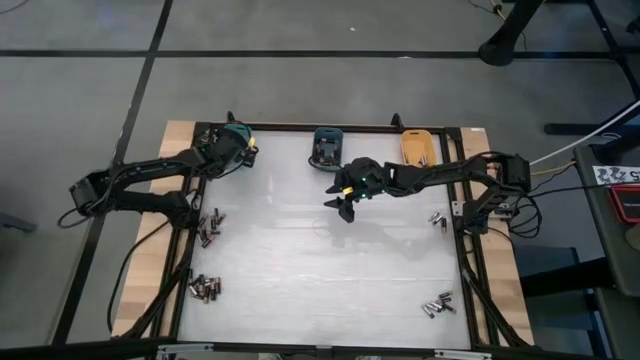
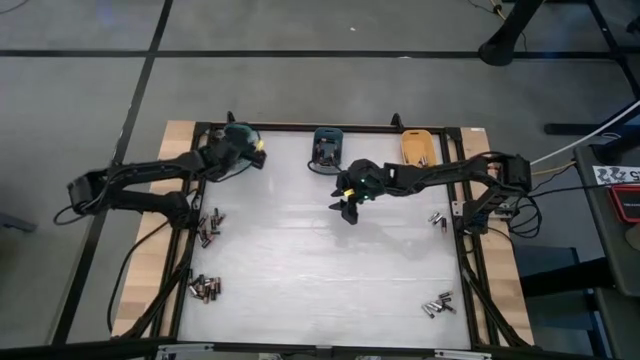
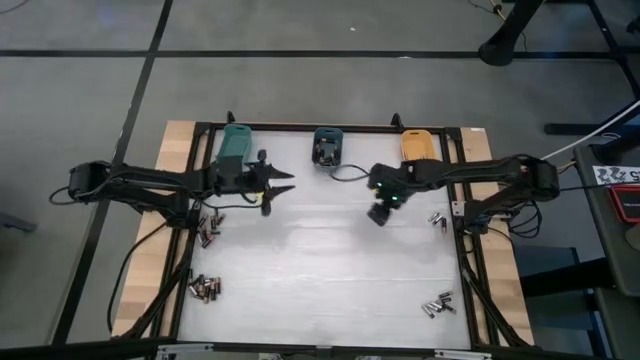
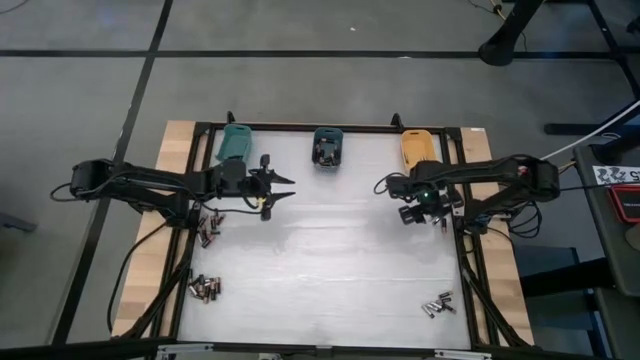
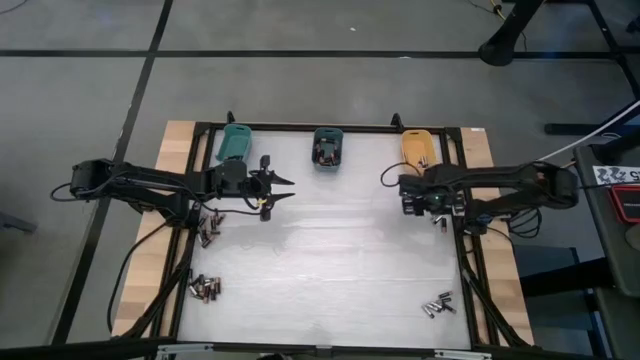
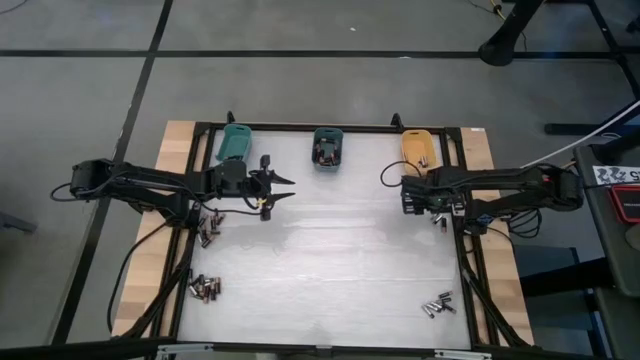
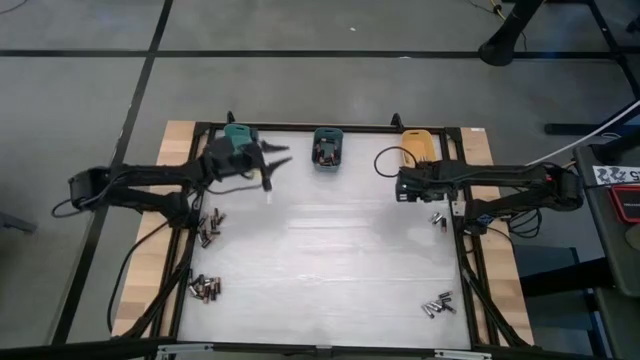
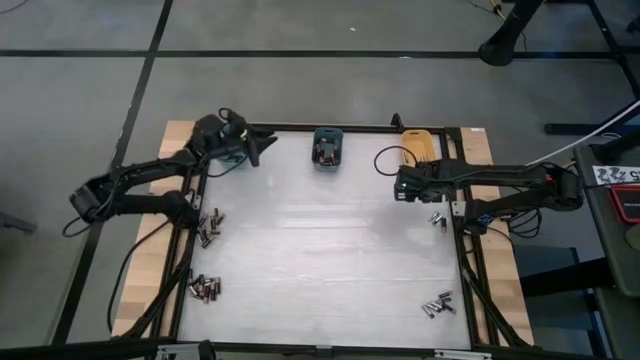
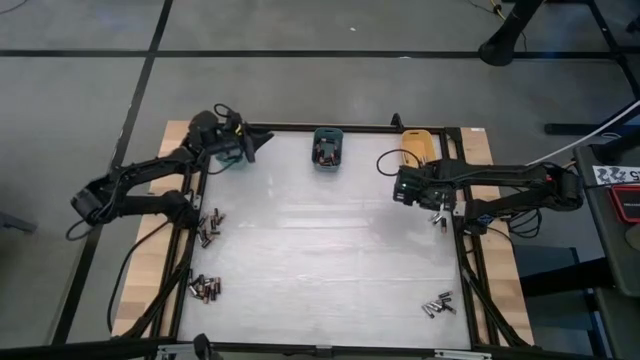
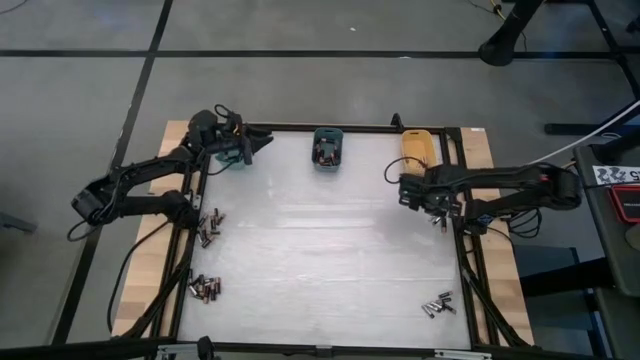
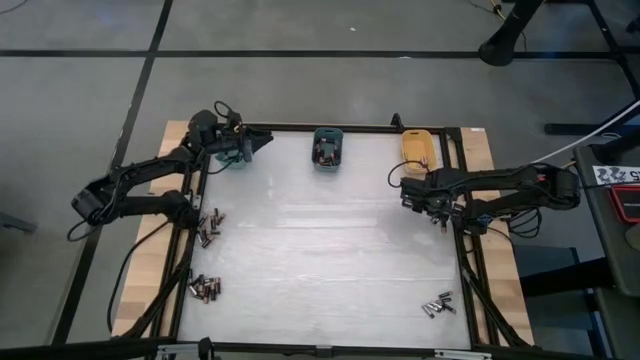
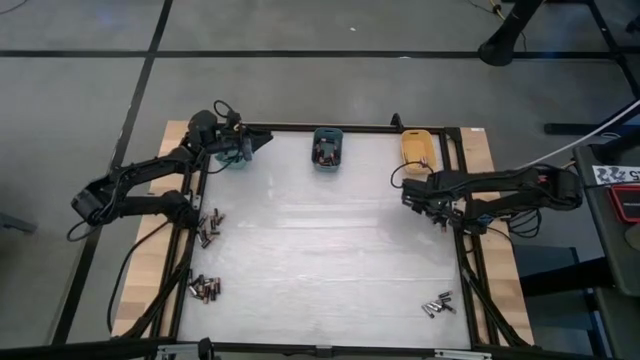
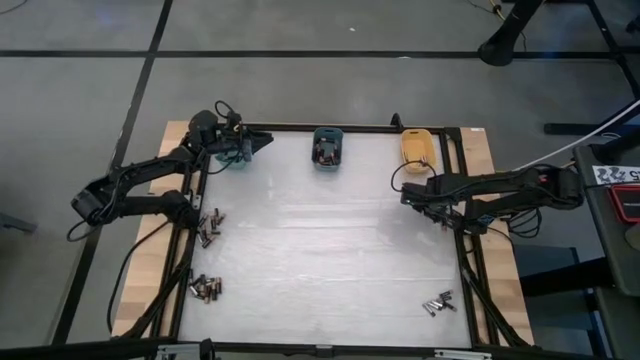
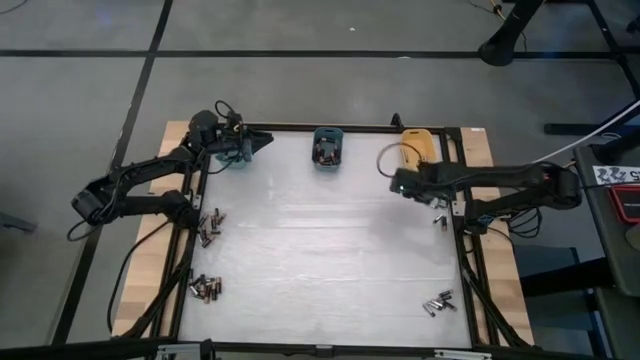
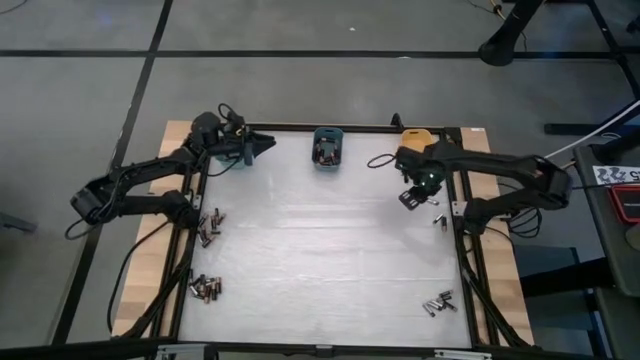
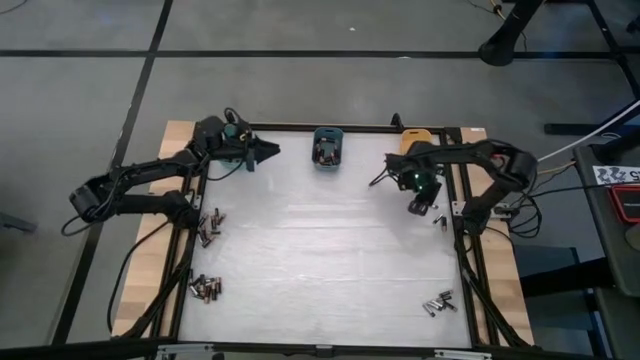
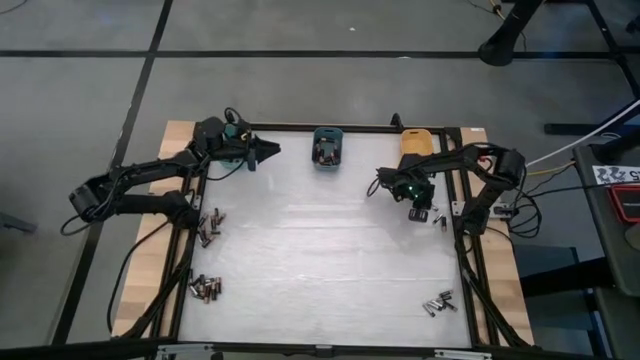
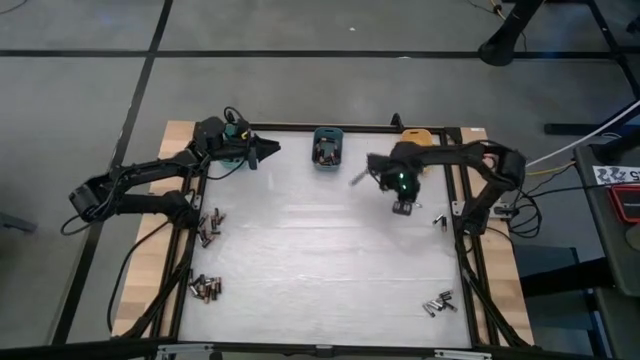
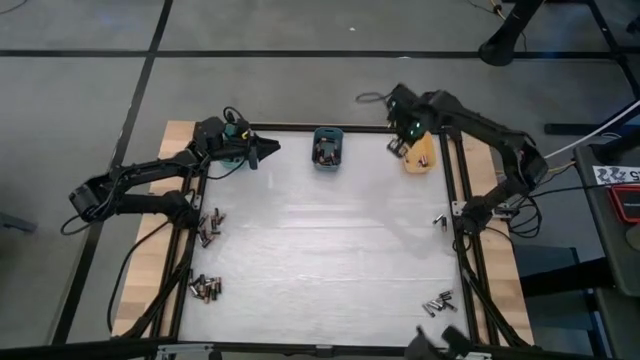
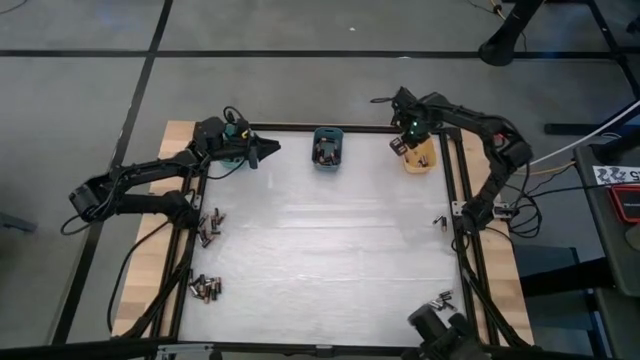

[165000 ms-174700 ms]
Task: Sort batteries
Put the silver battery into the yellow bin

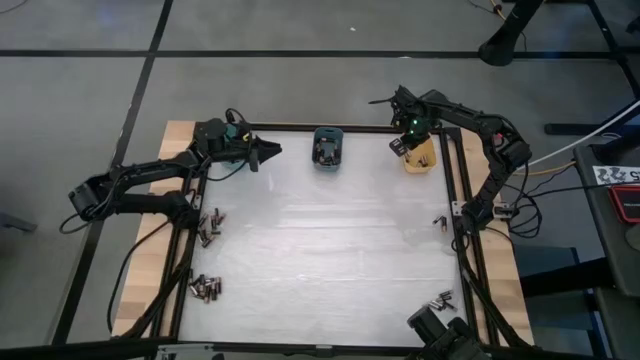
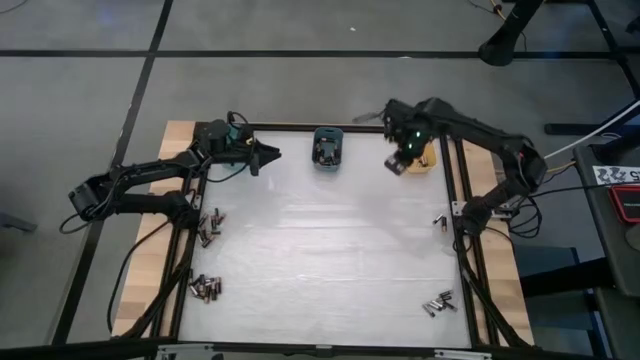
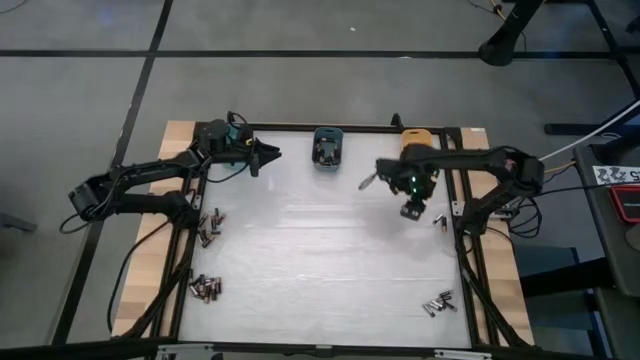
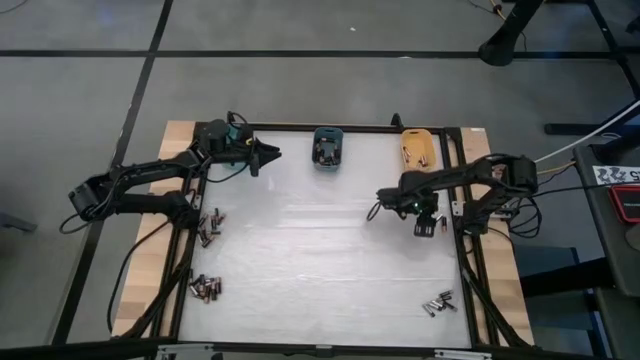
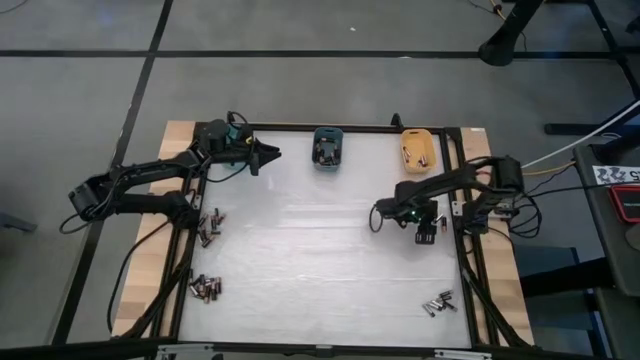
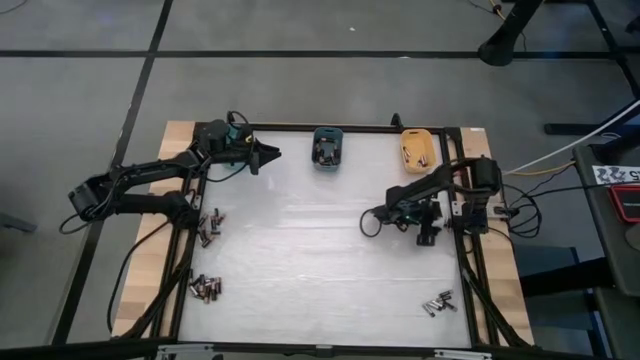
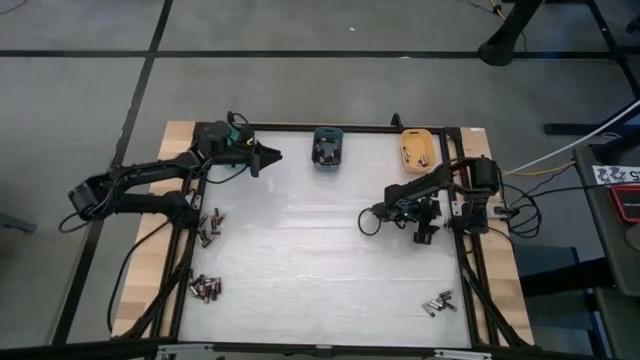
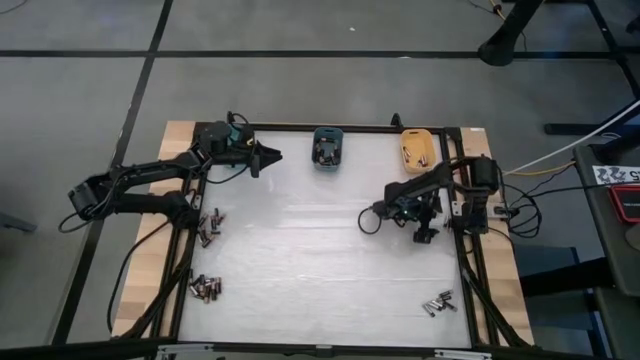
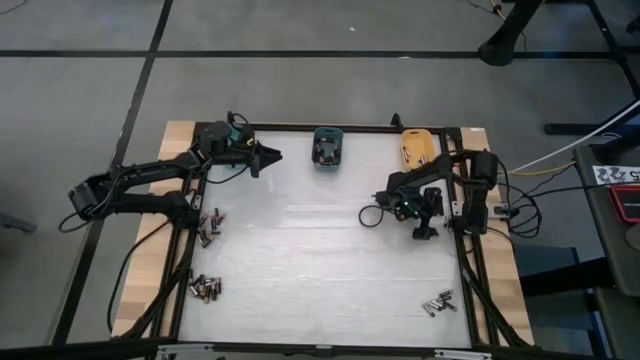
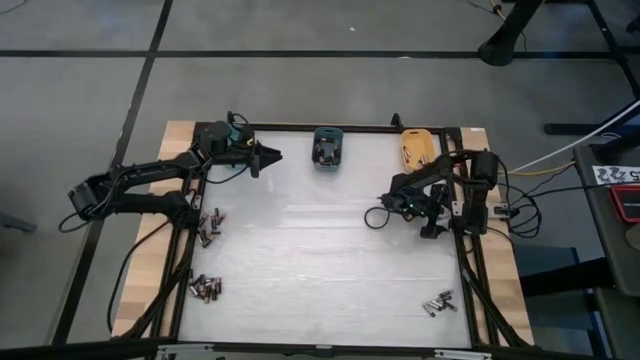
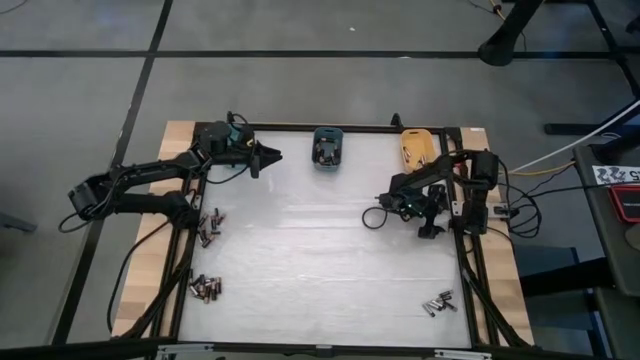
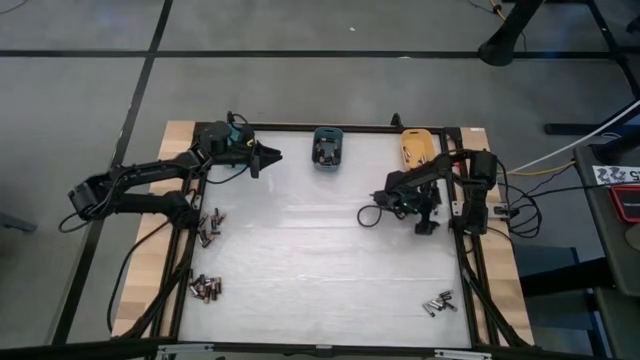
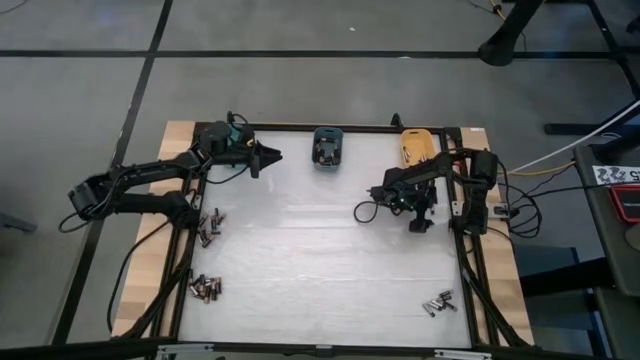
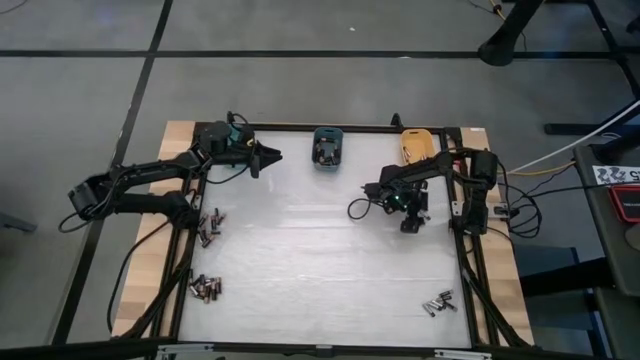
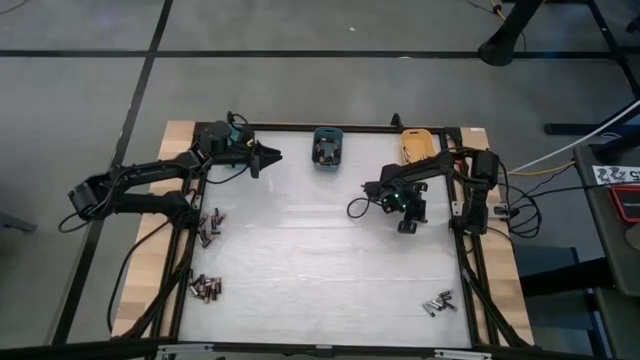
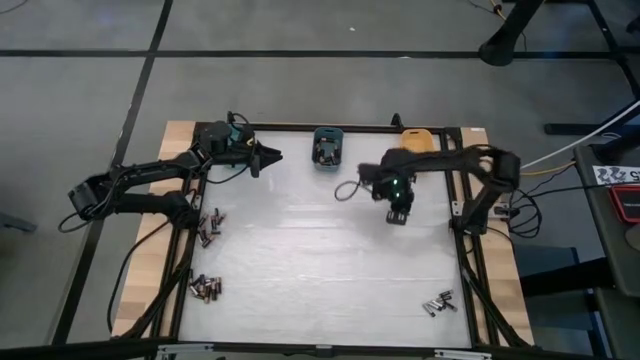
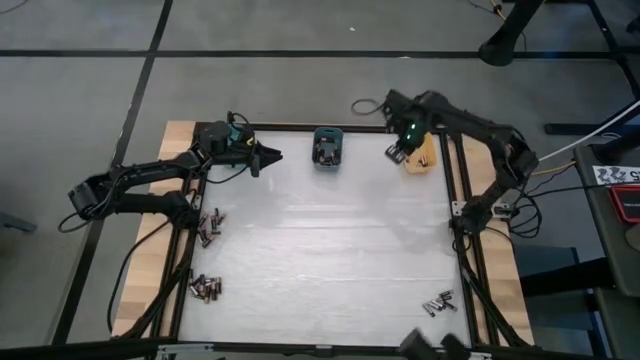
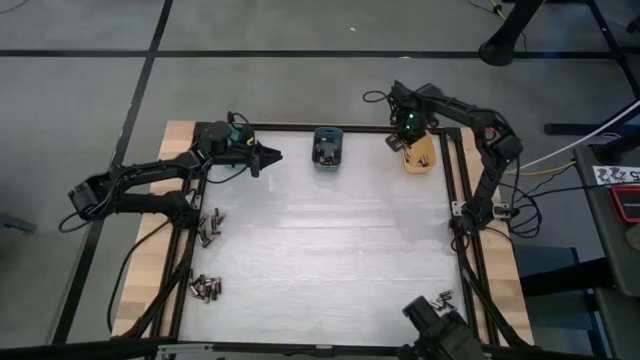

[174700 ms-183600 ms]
Put the silver battery into the yellow bin

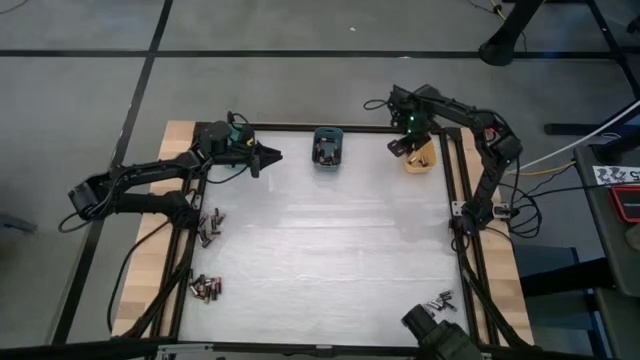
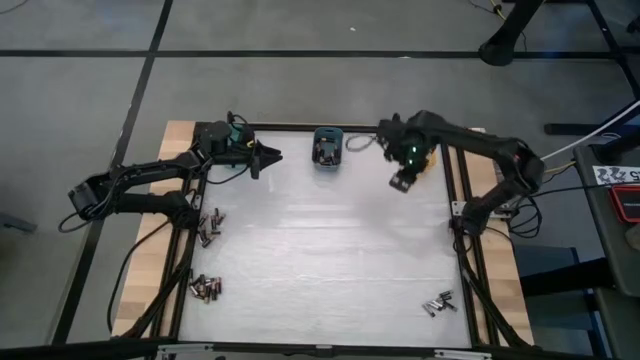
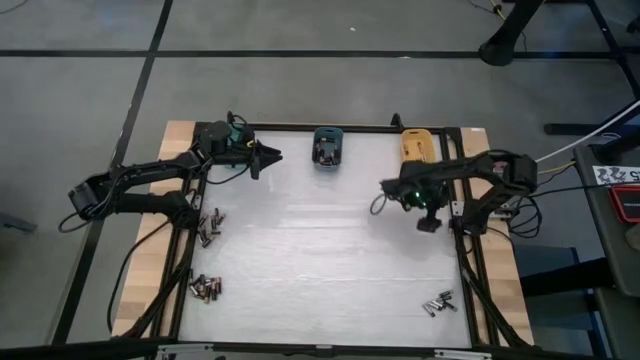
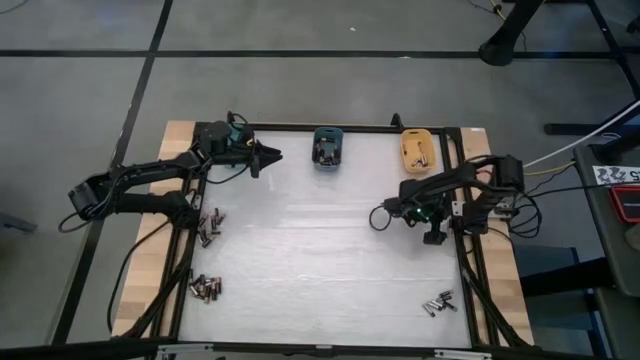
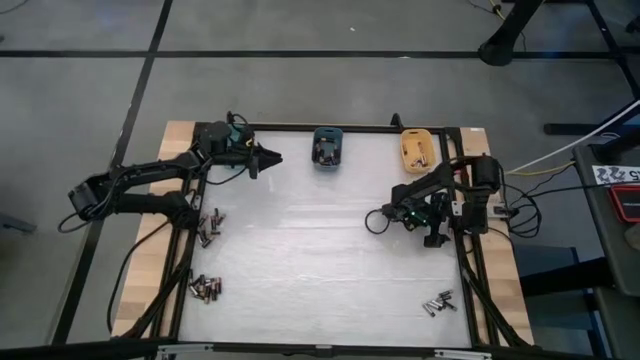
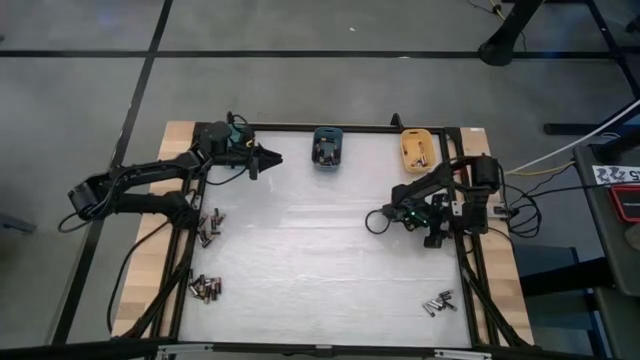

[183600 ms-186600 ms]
Put the brown battery into the blue bin
